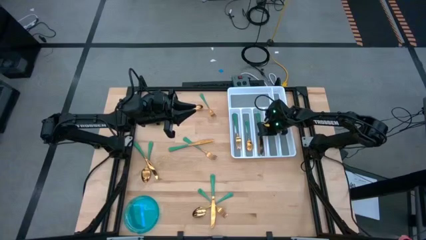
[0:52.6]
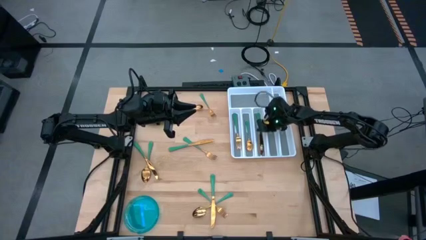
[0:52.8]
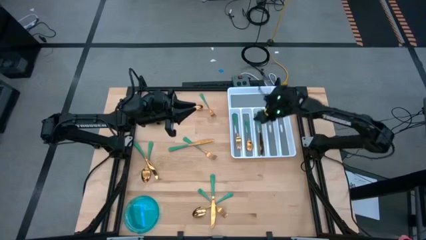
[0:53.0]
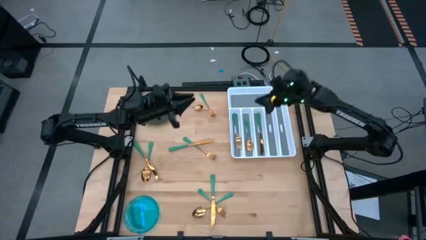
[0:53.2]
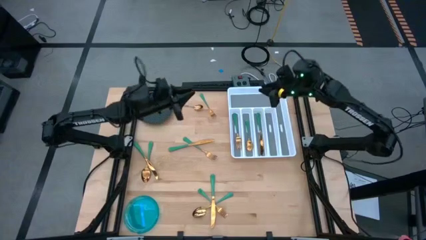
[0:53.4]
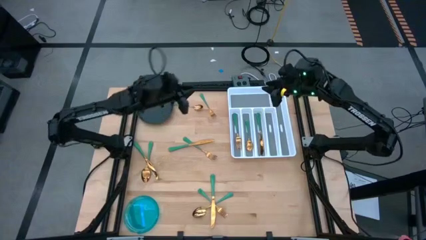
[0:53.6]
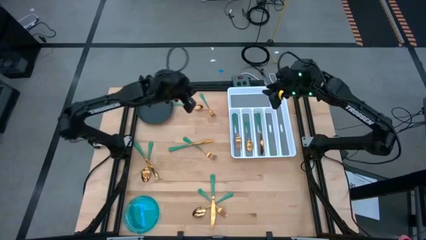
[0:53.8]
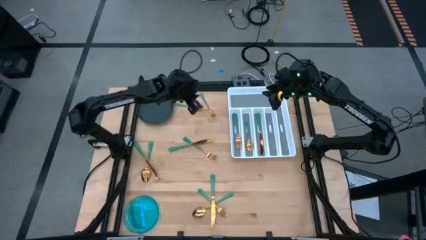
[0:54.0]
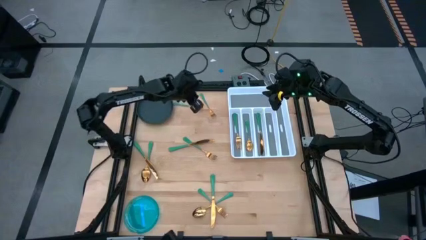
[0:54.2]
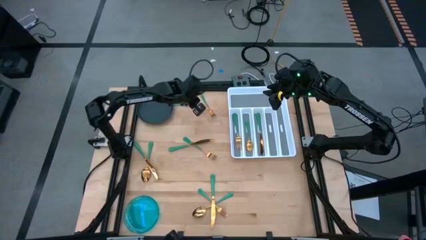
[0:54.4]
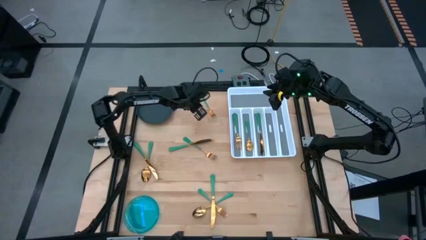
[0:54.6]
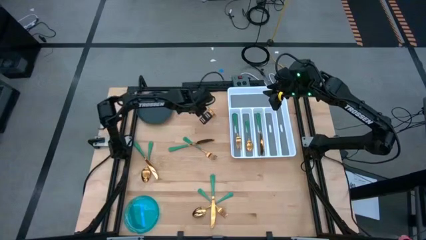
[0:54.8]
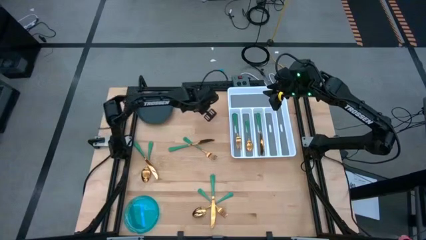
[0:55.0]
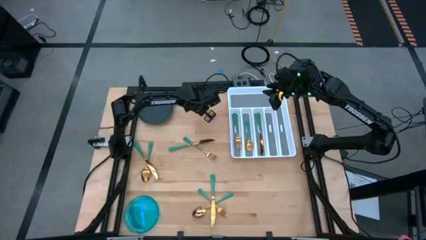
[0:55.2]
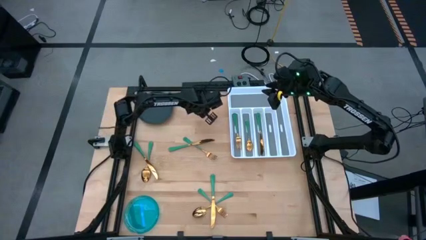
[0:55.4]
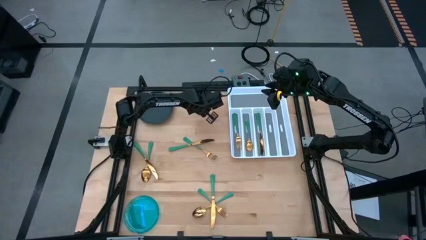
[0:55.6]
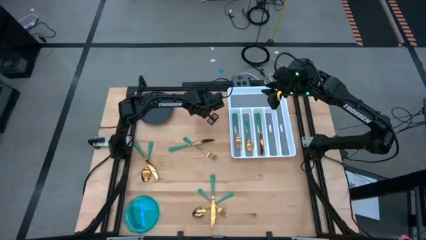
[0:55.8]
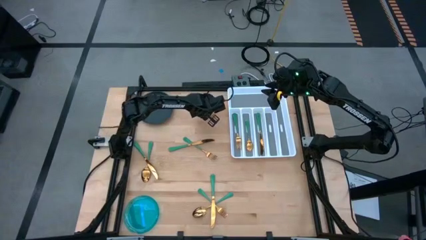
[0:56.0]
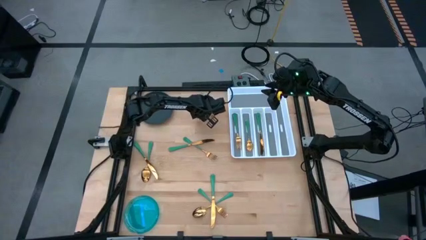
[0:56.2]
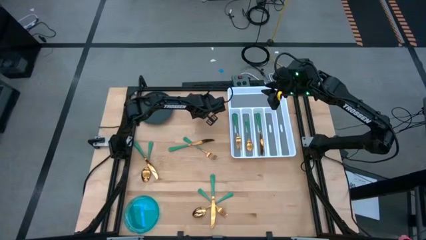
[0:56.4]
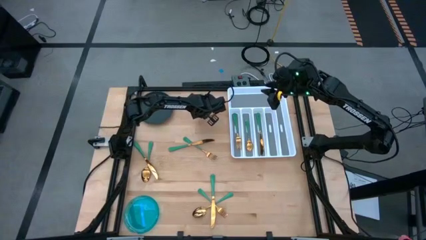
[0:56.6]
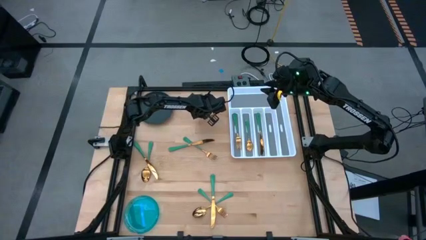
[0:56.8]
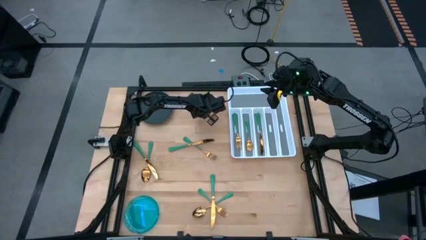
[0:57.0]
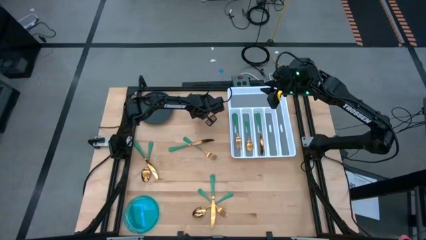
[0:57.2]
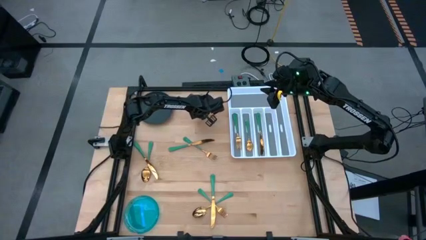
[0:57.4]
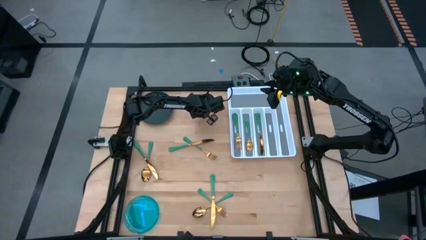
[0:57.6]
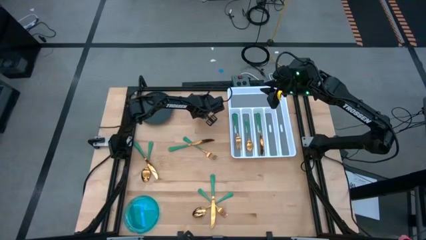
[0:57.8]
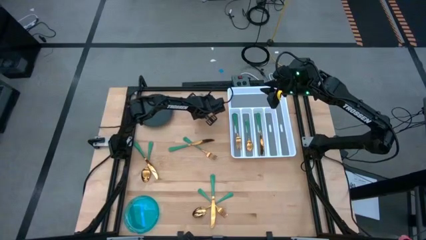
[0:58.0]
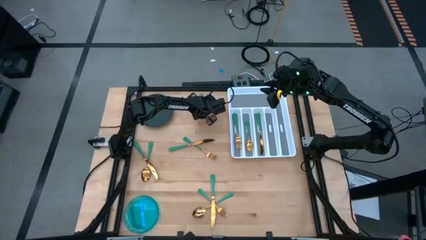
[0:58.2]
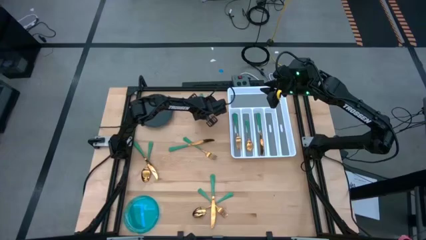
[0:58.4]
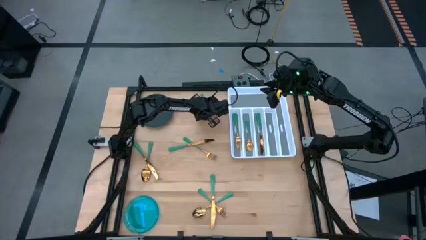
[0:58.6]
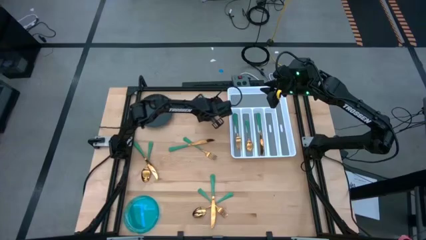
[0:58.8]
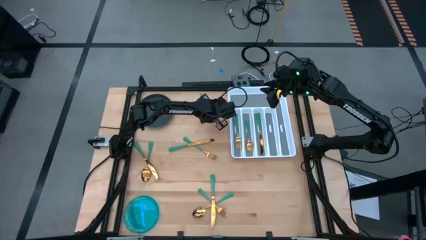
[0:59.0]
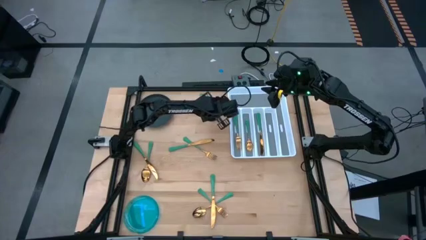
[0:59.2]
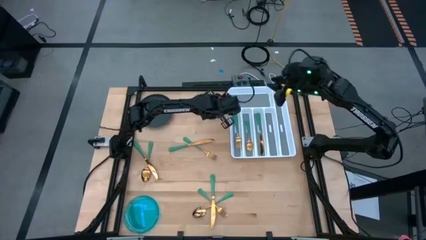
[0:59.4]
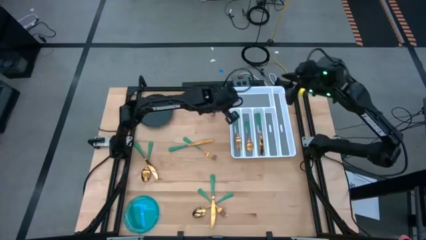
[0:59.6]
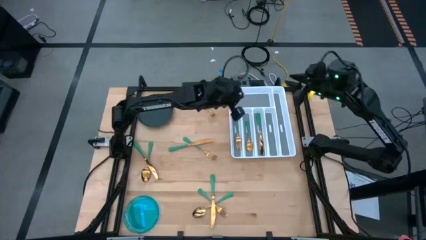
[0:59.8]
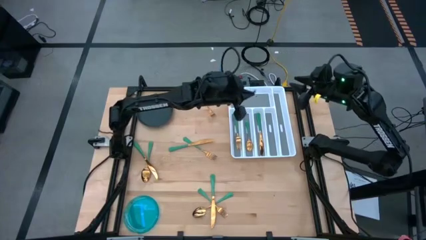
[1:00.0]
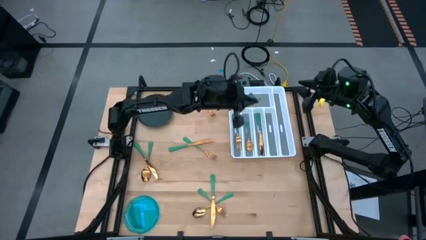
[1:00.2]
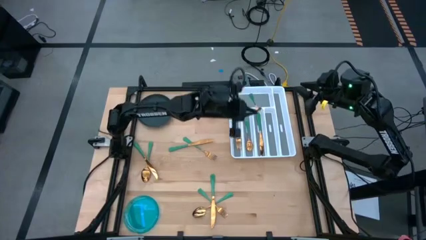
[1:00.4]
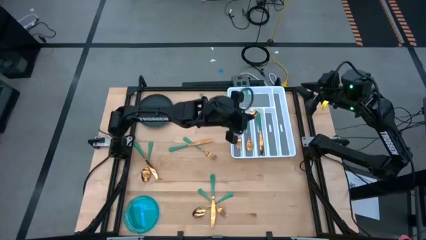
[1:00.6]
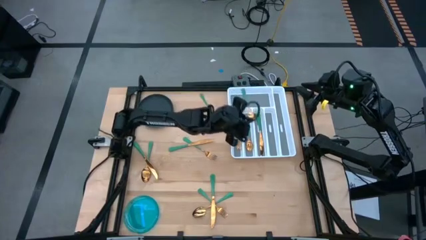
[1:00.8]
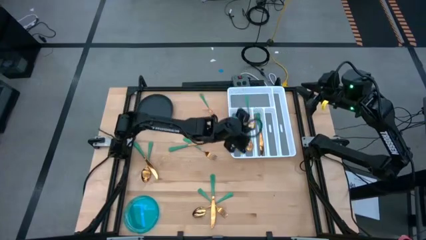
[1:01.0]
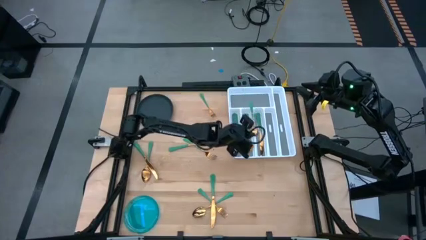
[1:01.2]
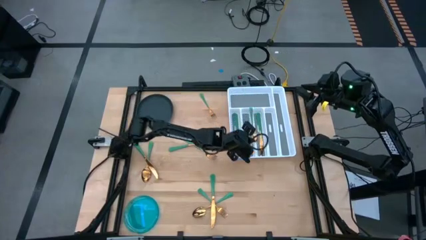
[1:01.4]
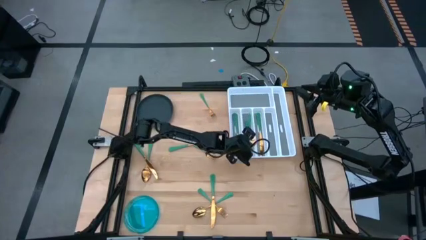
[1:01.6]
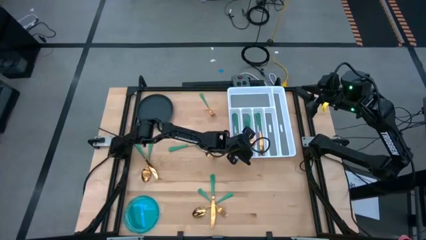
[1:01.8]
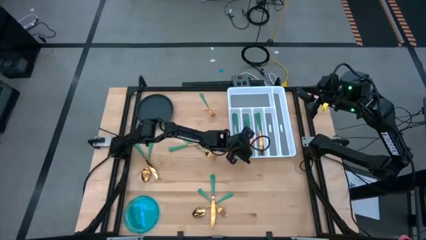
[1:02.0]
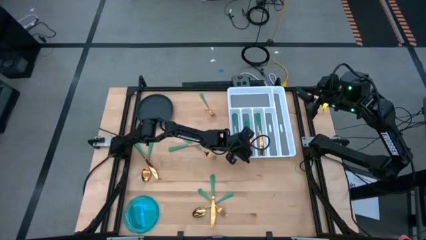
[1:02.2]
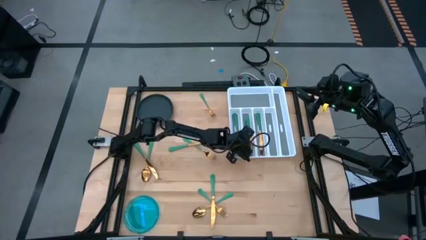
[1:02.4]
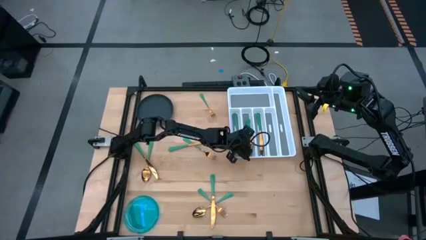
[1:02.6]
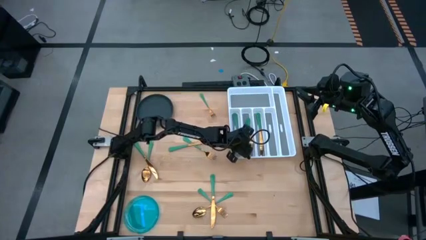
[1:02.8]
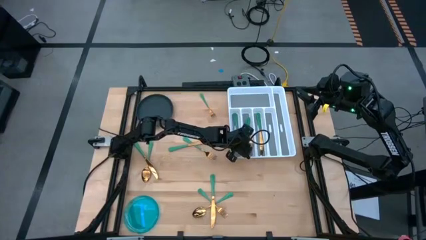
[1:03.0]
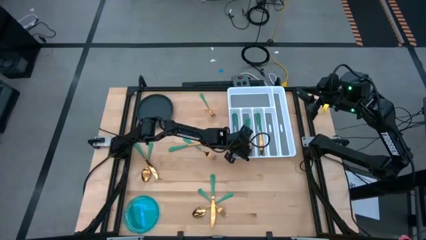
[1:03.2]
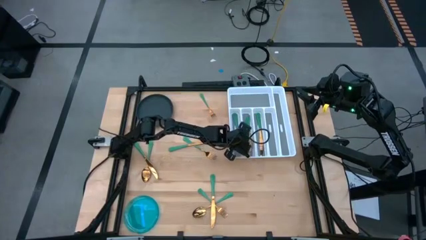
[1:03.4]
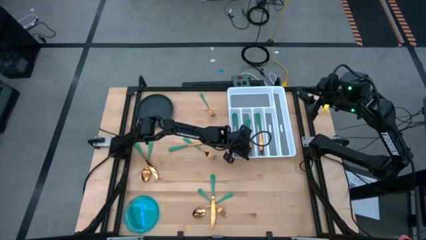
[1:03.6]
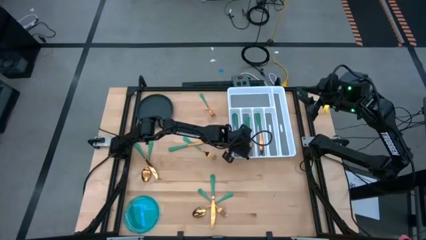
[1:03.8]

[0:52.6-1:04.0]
Task: Sort silverware
Put the green spoon into the white silverware organizer

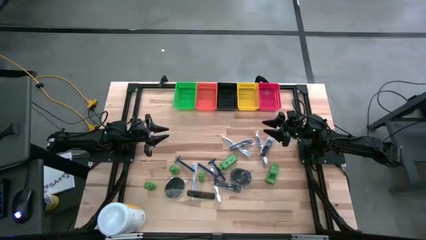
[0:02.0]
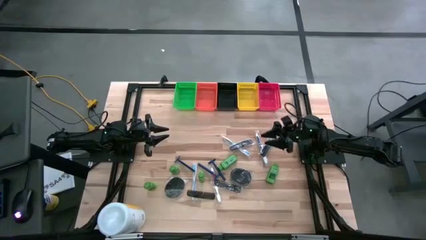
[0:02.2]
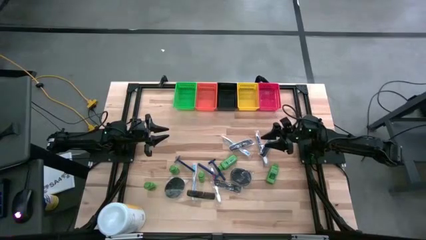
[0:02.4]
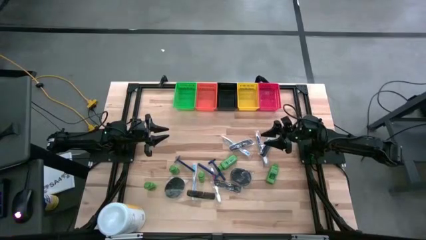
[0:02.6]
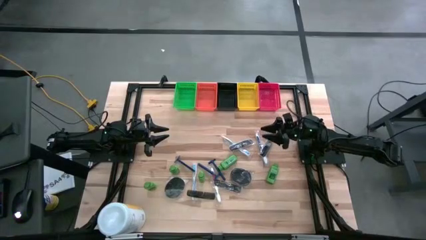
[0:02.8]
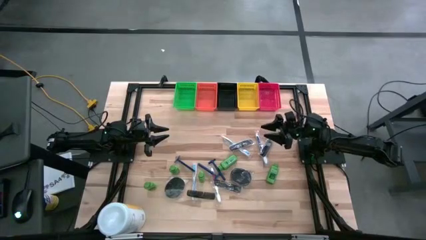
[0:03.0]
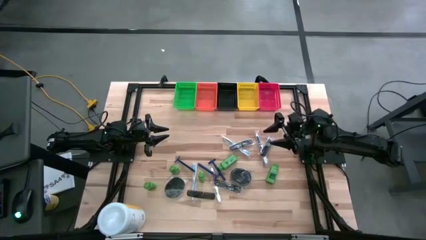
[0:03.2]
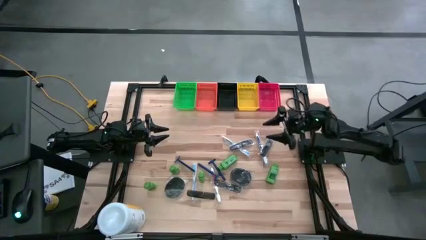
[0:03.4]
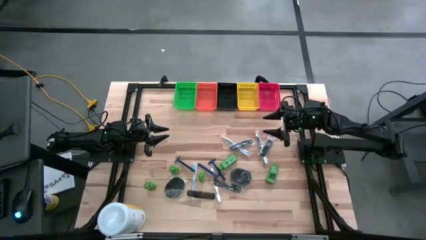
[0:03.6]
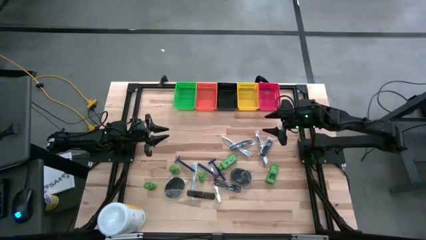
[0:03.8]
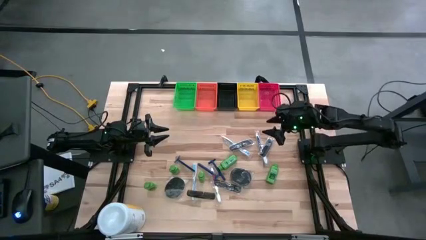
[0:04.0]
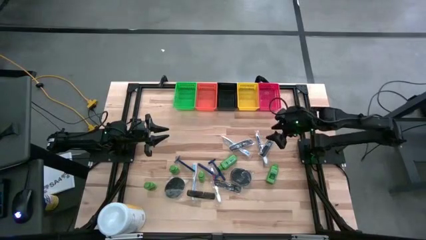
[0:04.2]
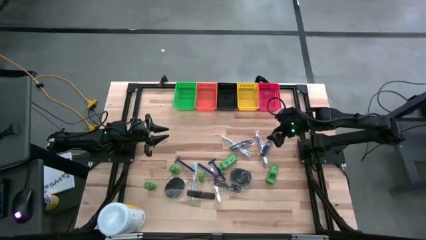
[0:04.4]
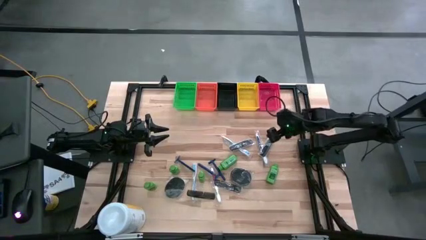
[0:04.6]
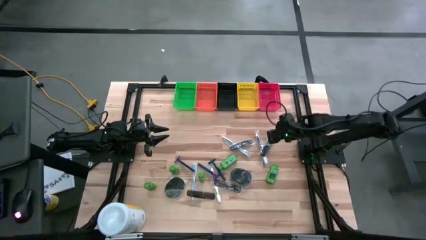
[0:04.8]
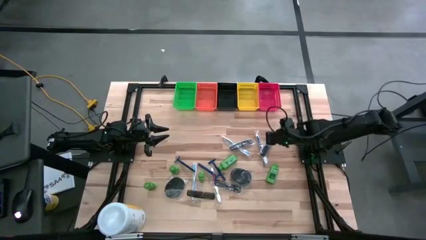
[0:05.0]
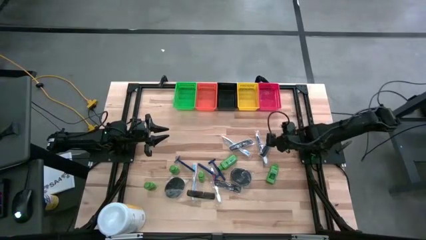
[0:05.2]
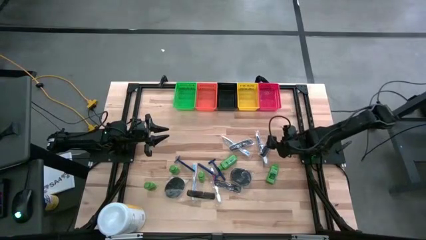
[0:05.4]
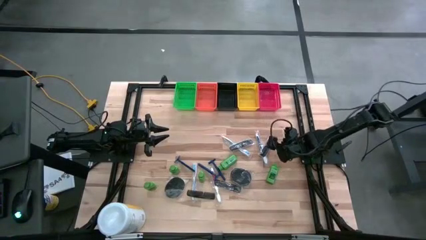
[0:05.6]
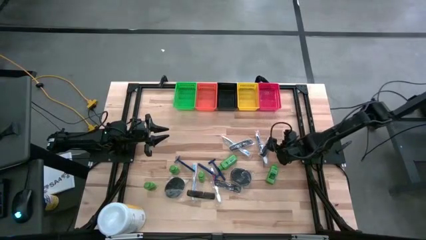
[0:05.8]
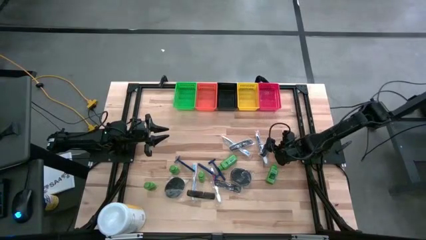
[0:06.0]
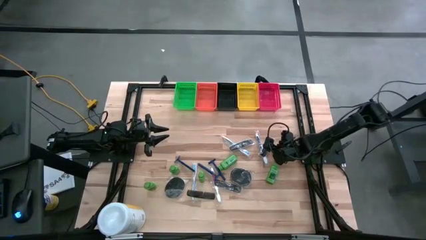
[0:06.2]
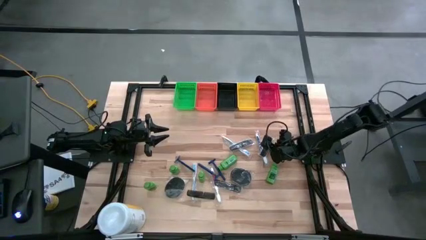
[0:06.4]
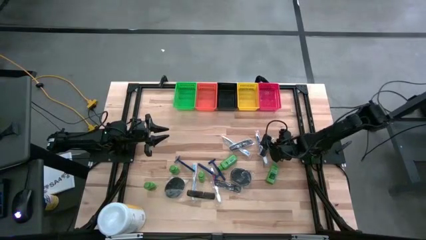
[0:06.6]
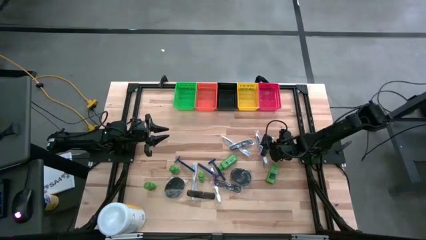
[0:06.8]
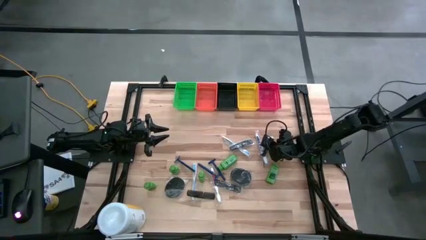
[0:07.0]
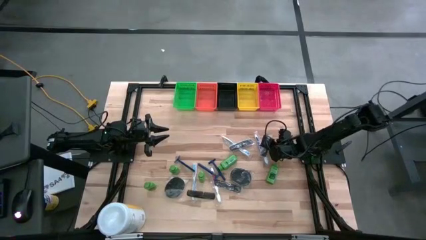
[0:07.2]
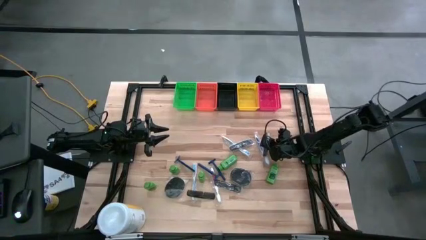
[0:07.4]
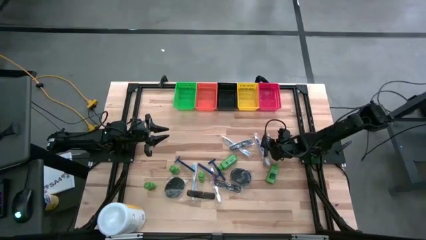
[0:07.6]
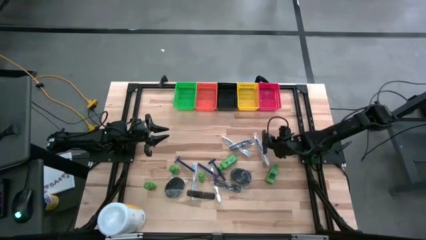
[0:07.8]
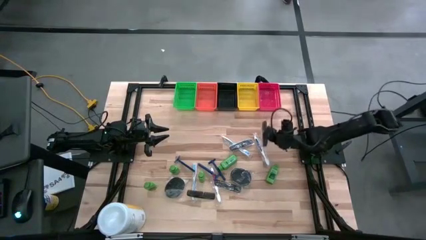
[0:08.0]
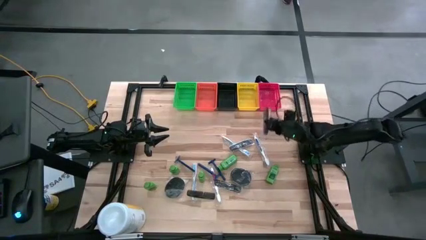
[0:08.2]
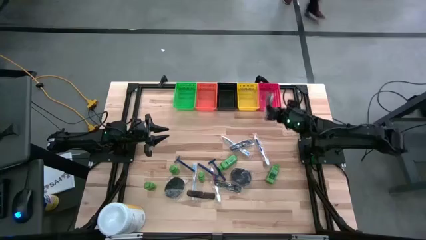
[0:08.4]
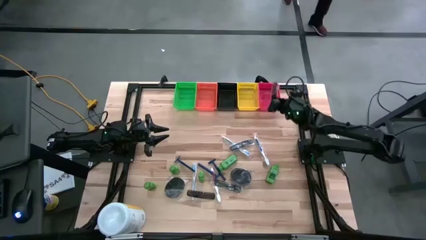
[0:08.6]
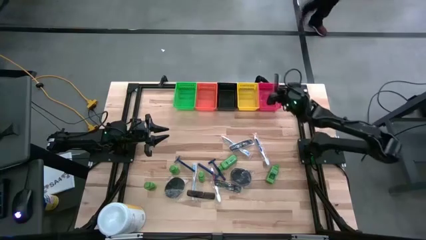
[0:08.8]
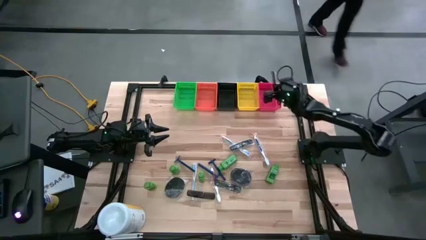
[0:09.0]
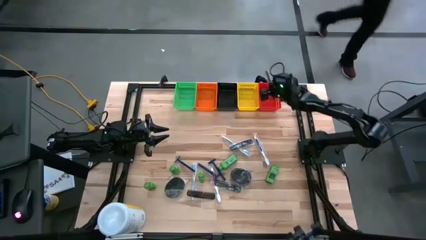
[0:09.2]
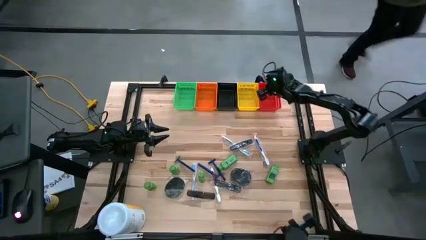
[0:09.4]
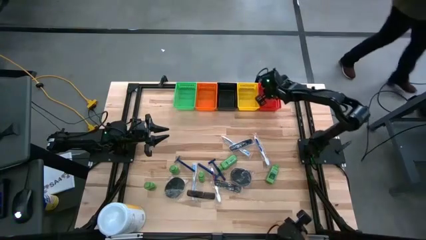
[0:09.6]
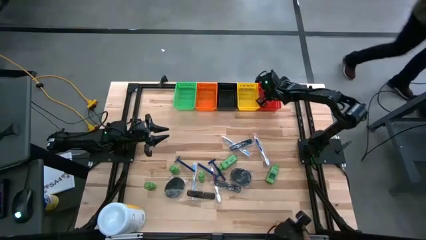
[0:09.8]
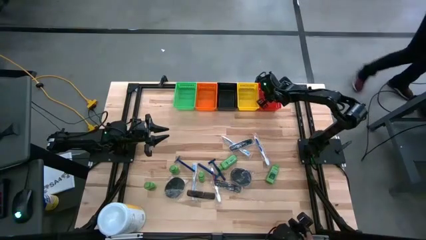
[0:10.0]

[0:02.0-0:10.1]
Task: Pick & Place Travel size toiletries
Put the black comb into the red bin
